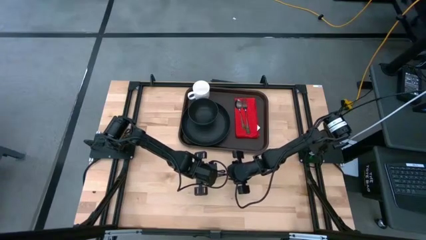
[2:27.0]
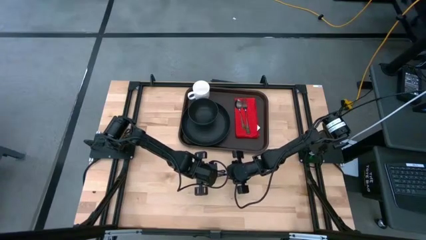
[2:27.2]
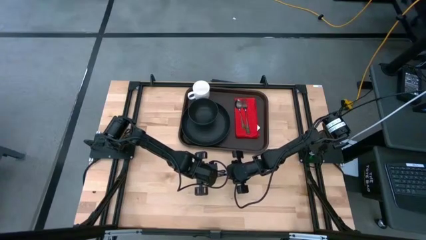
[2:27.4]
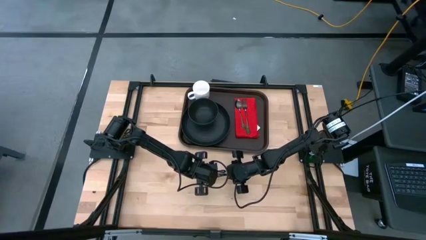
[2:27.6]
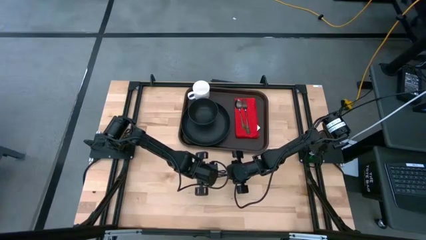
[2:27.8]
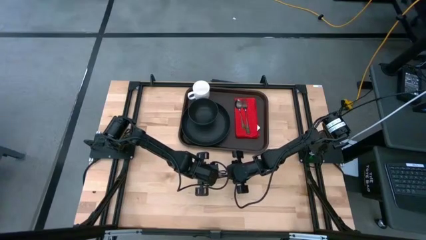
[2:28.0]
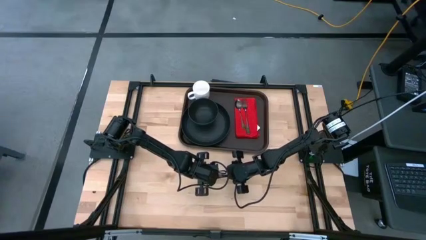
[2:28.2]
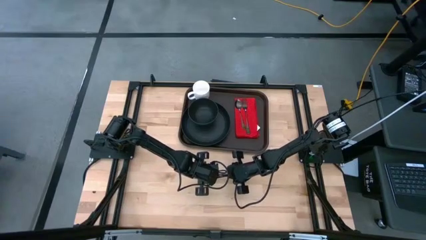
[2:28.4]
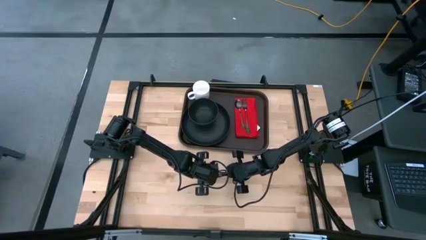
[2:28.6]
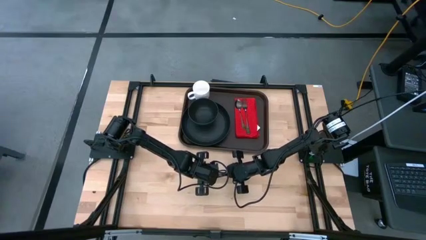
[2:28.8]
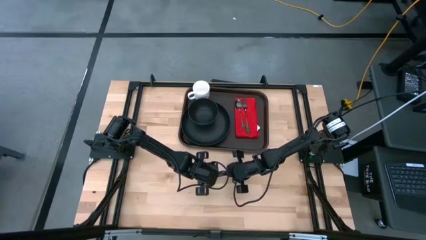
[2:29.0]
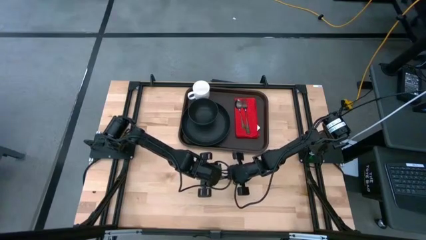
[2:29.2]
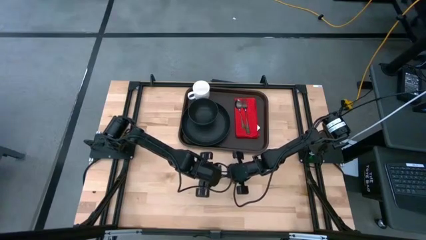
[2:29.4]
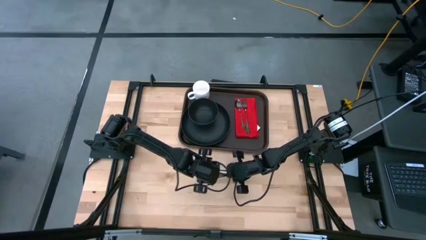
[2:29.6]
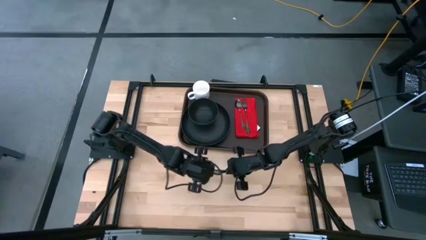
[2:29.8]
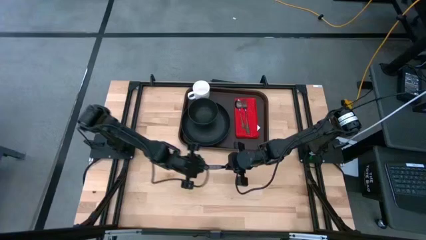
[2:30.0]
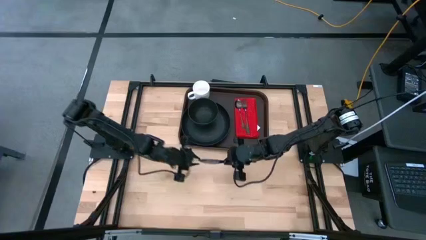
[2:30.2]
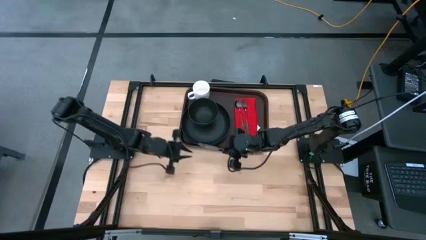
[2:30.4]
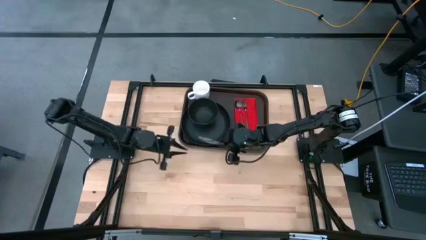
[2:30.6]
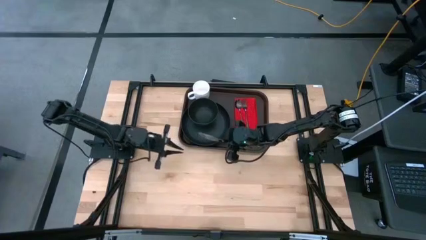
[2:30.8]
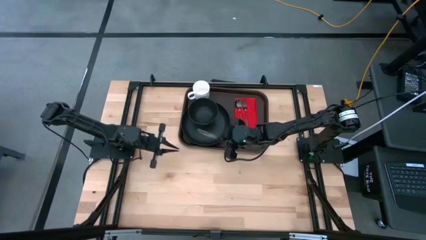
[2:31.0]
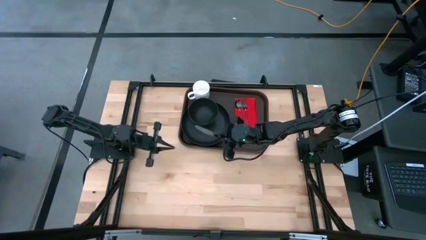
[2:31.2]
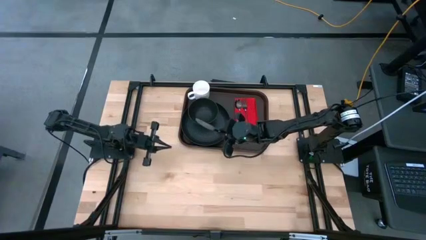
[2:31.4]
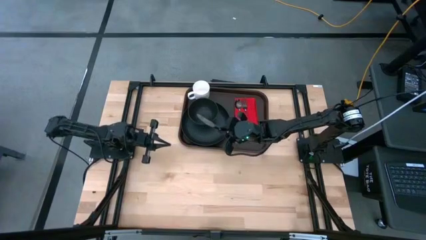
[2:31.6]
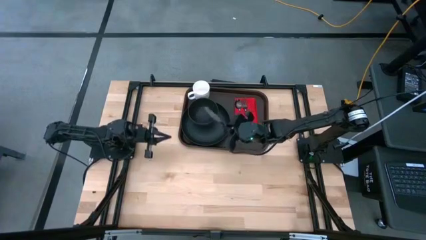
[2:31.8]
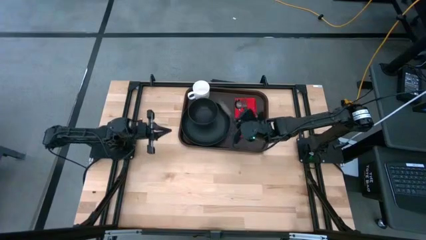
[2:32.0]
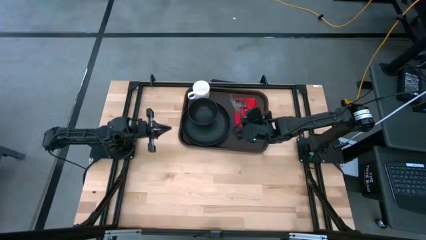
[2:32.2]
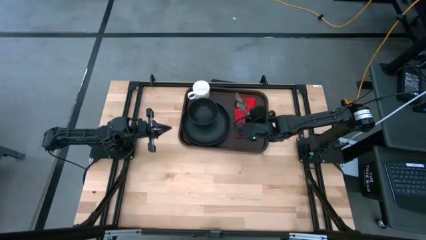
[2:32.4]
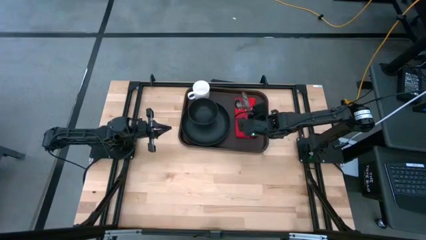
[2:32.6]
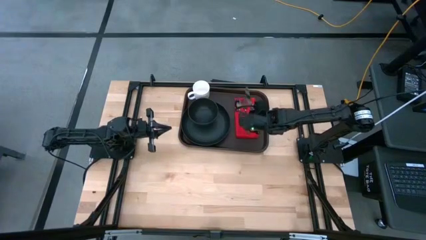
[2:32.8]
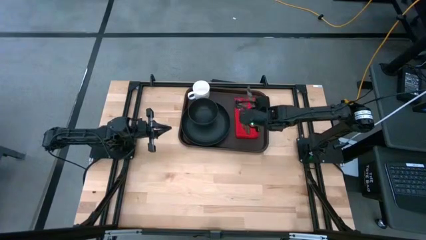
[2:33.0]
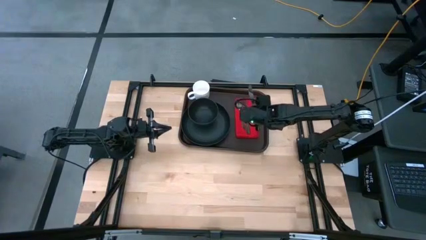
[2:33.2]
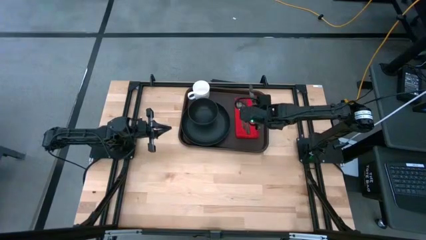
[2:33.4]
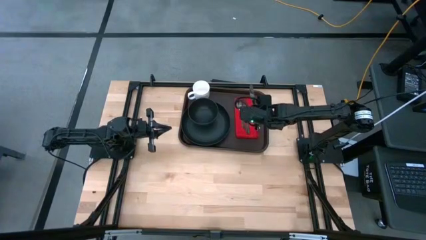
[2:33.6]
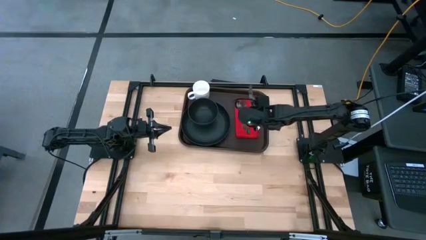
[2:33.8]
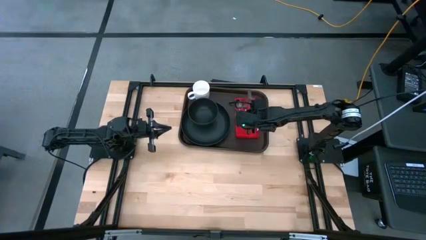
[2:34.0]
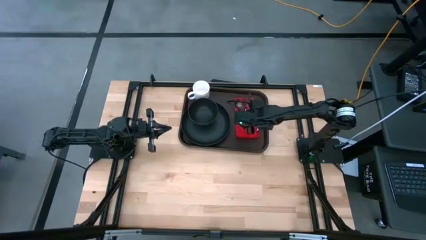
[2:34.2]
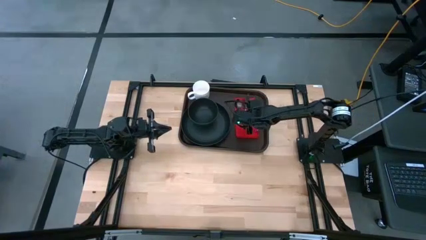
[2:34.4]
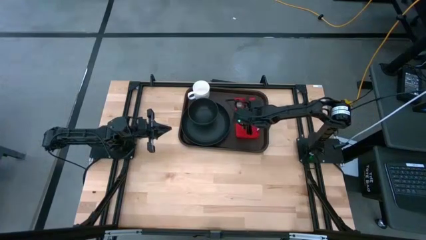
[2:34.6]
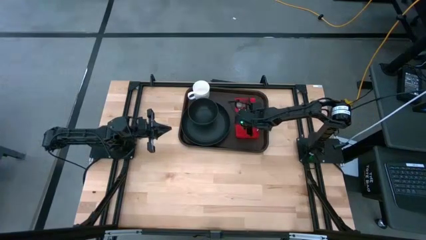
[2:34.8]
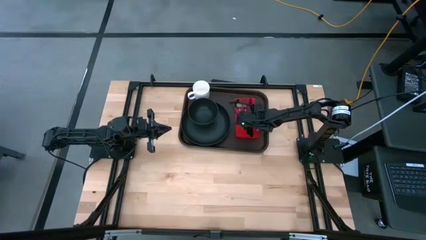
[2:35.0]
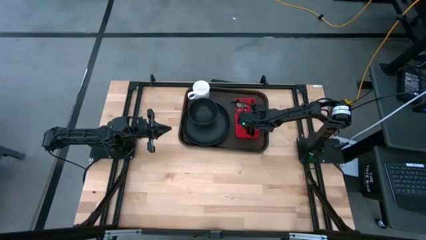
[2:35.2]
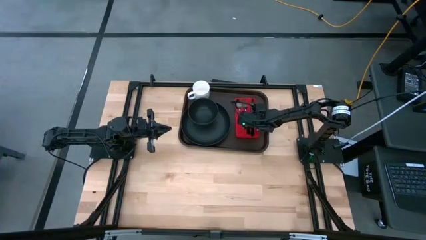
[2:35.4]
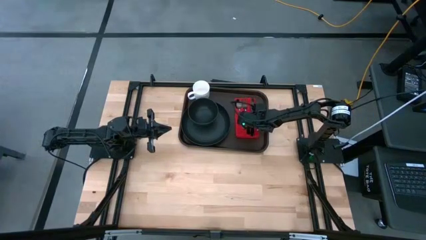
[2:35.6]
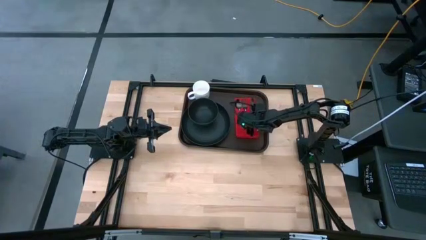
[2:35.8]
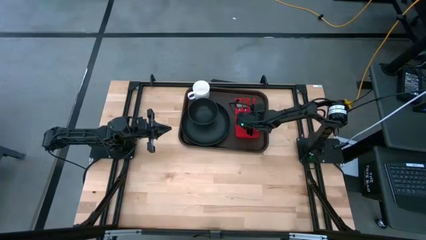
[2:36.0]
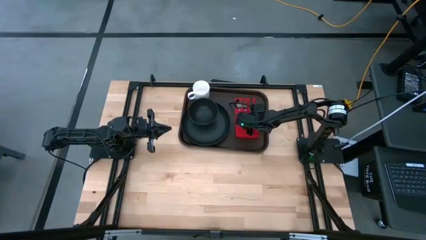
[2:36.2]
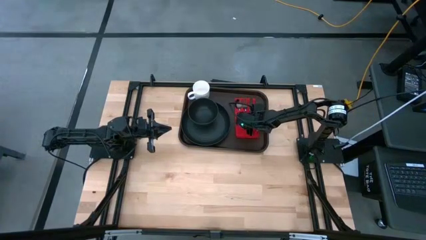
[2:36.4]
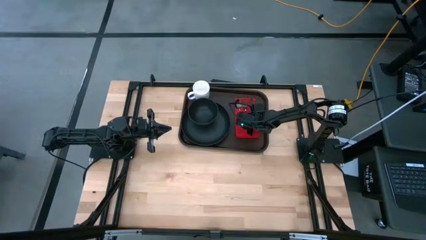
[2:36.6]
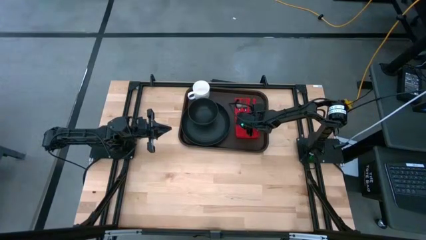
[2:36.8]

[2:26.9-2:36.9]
Task: Set up tray
Put the black knife on the red napkin to the right of the black fork

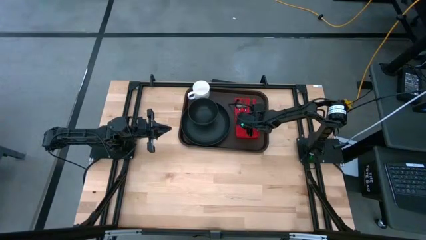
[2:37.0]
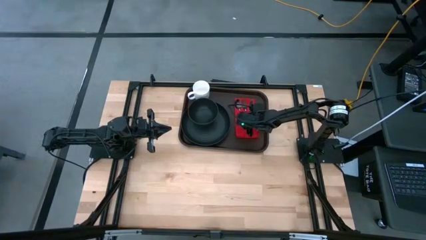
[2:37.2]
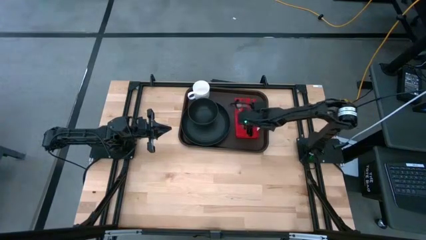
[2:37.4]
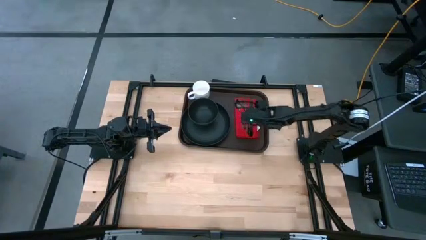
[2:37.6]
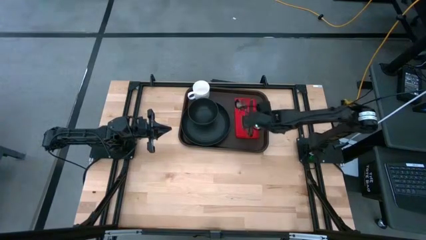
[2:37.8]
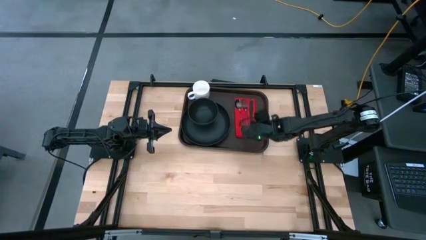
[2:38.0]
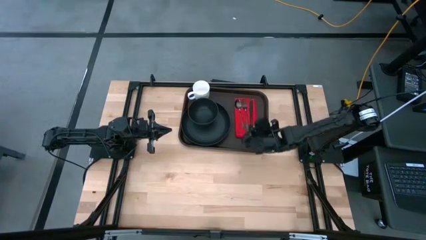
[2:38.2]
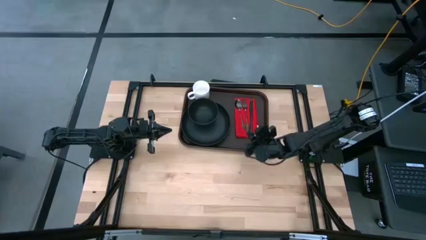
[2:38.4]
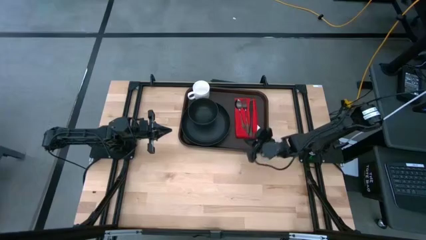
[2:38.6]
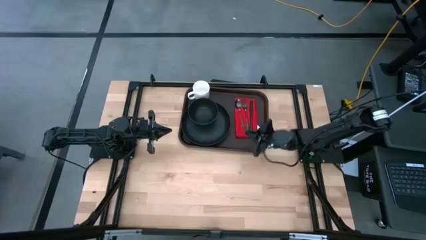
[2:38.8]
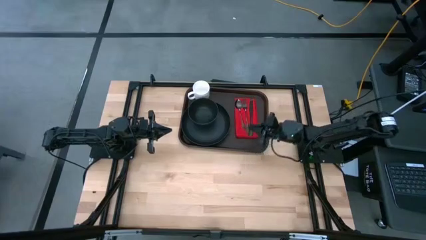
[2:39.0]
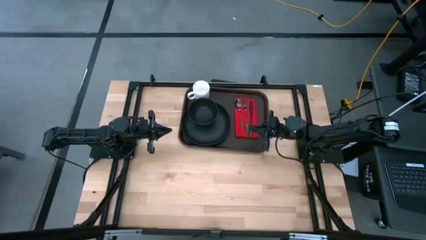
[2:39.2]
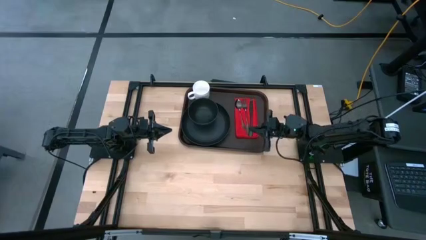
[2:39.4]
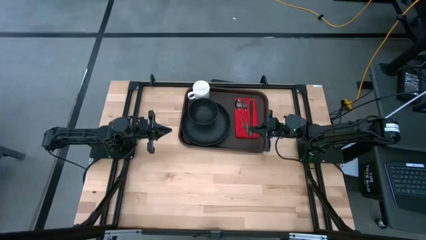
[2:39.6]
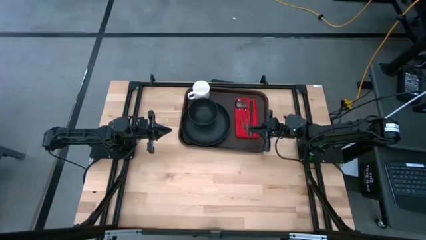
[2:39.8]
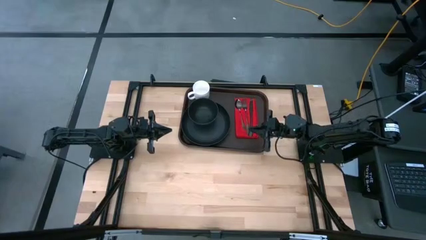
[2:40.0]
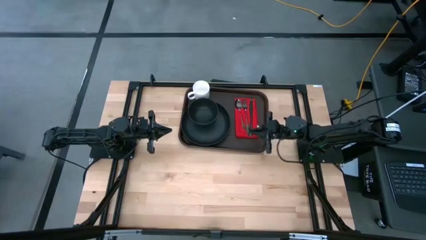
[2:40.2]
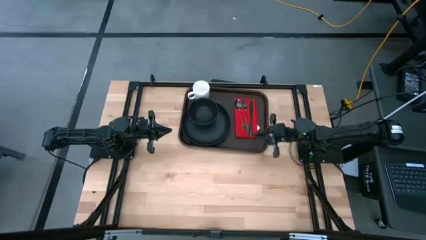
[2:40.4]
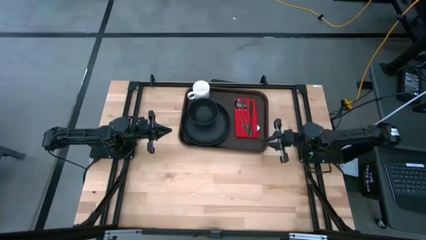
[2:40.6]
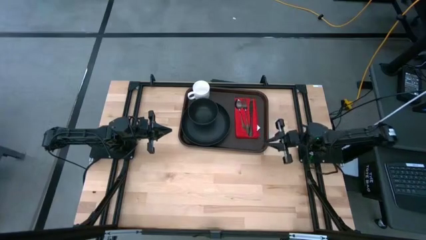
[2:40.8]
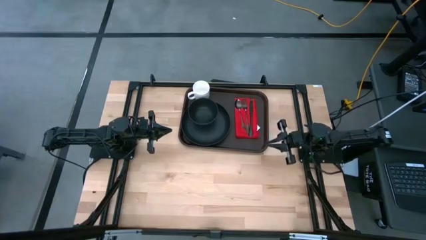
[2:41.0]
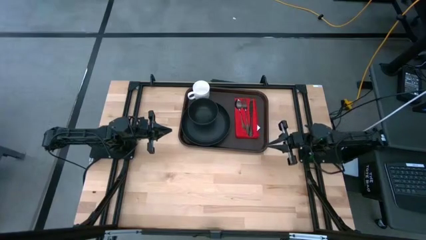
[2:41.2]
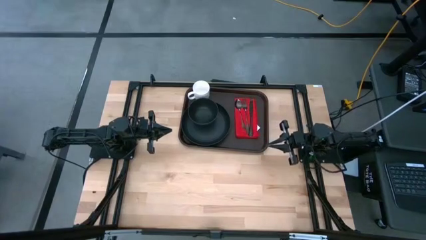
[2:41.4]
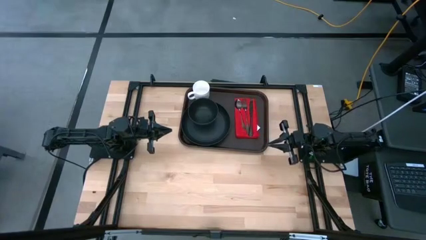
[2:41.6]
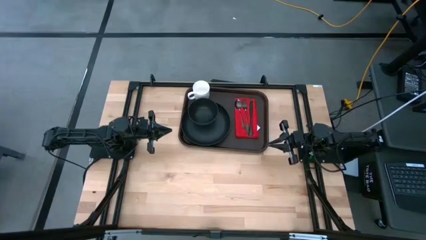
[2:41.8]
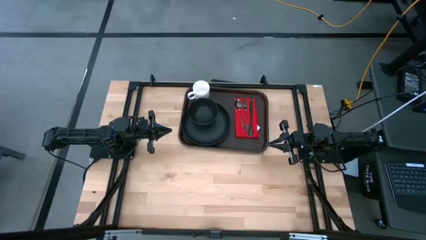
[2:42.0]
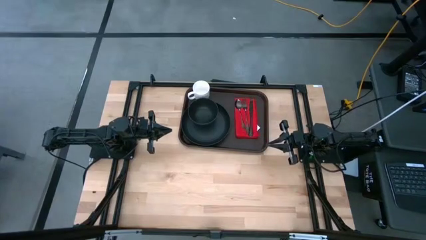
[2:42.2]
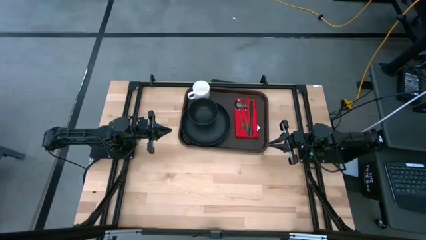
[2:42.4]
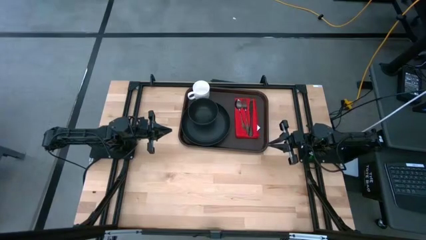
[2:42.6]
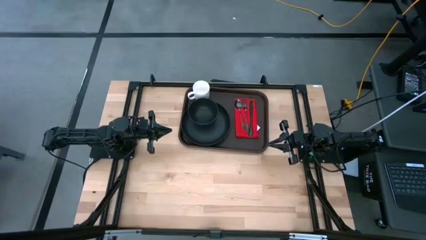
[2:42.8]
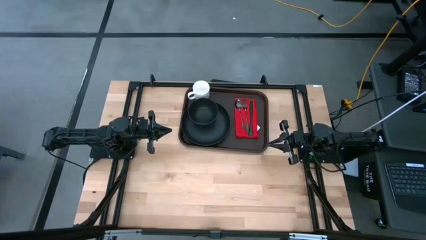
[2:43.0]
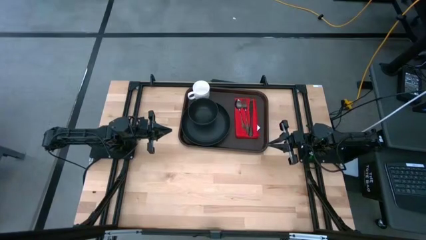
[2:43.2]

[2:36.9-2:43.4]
Return to Home Position
